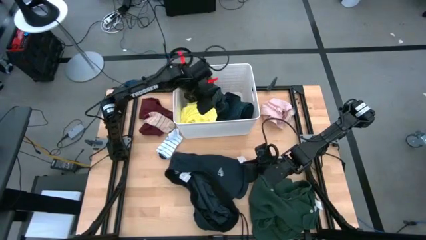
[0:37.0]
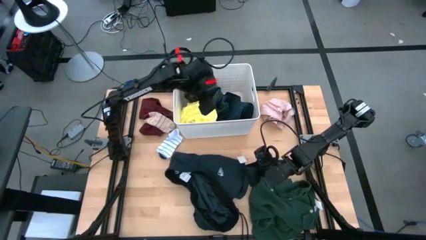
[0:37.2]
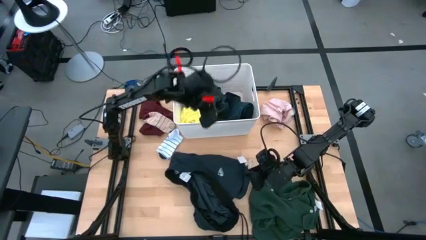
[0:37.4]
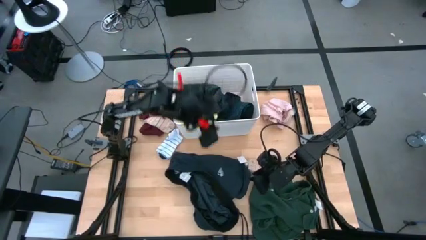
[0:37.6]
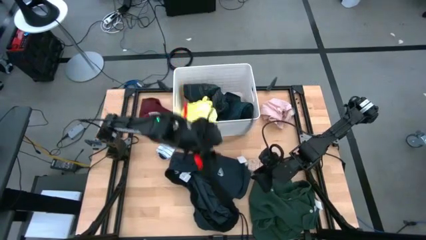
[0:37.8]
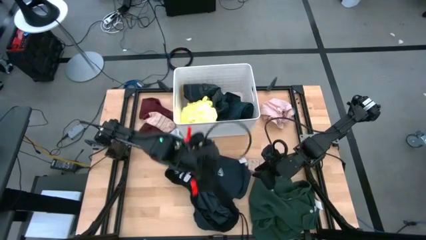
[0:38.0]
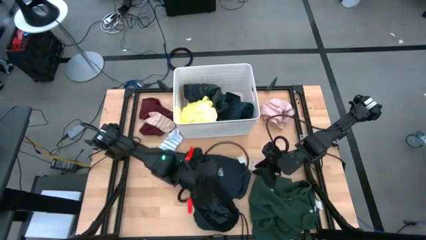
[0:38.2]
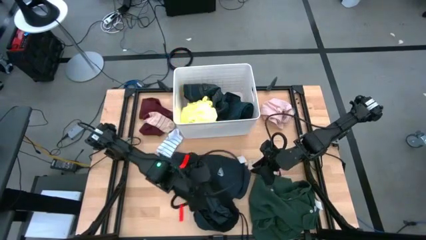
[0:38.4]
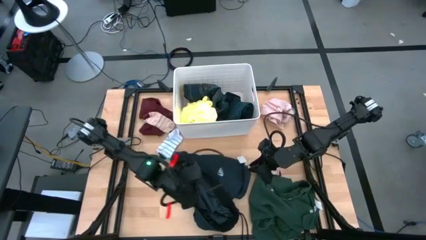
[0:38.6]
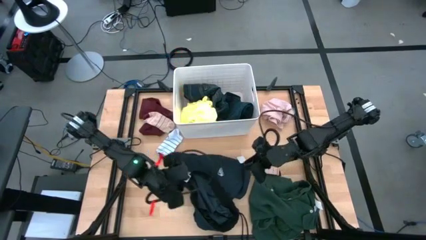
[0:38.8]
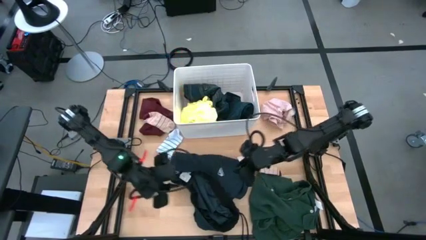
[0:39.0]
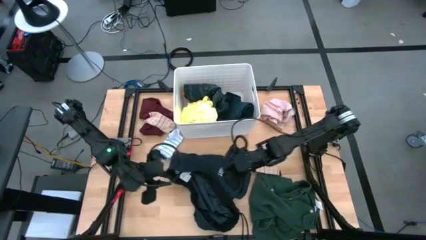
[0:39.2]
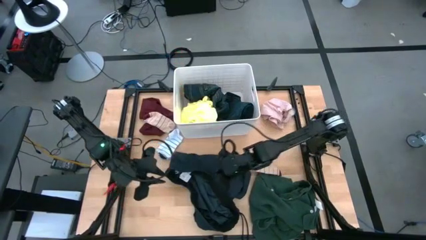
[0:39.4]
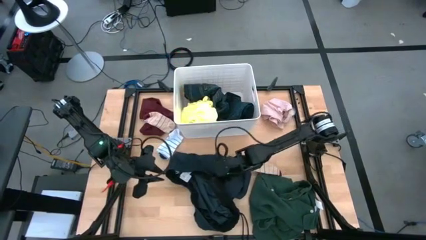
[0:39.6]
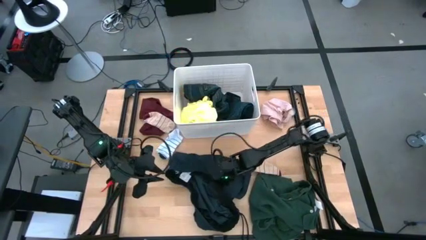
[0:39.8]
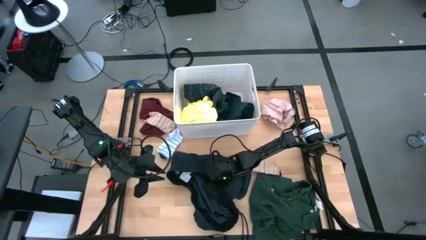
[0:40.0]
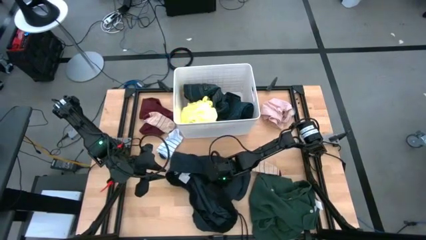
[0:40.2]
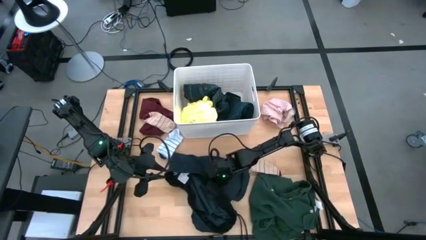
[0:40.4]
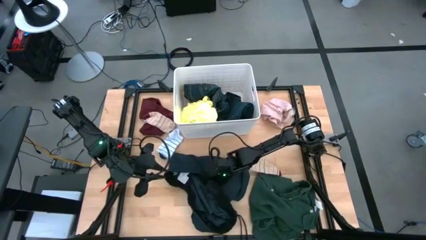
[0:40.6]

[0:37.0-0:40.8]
Task: Sort clothes
Put the dark blue shorts into the white bin

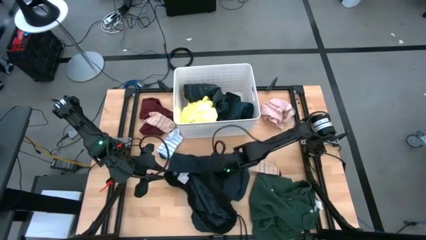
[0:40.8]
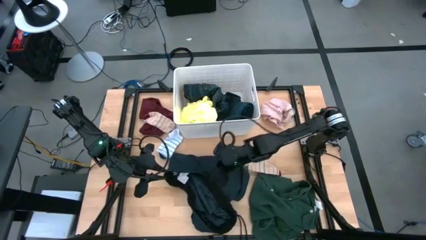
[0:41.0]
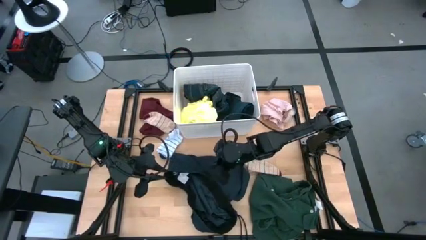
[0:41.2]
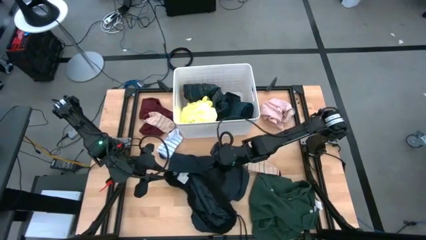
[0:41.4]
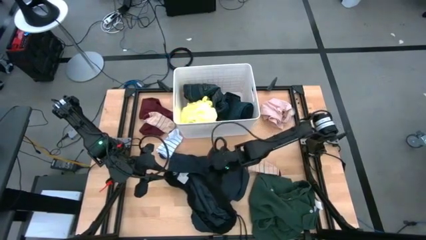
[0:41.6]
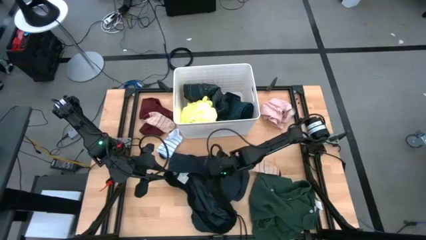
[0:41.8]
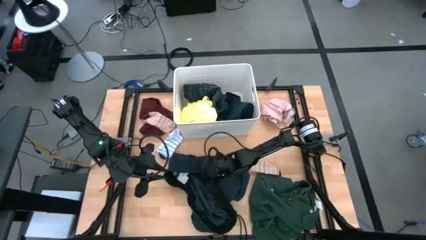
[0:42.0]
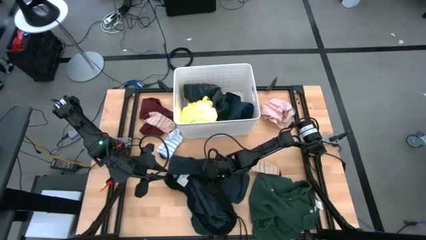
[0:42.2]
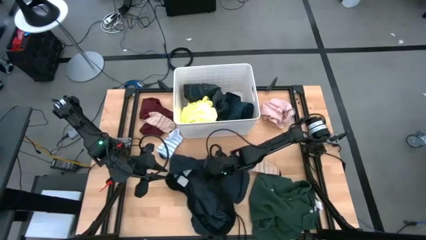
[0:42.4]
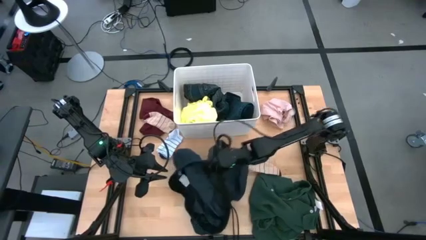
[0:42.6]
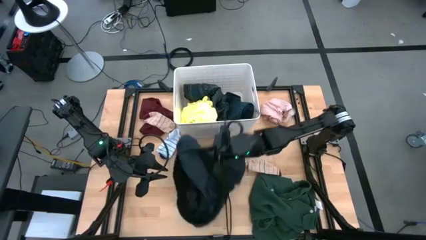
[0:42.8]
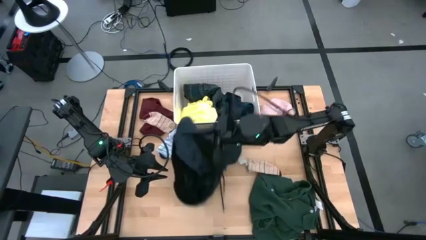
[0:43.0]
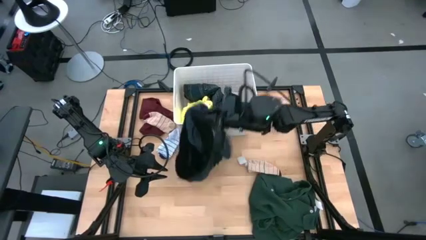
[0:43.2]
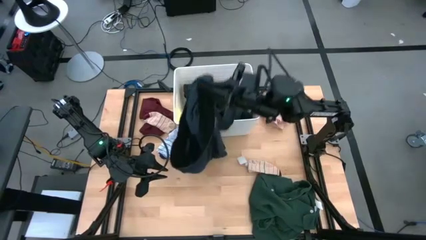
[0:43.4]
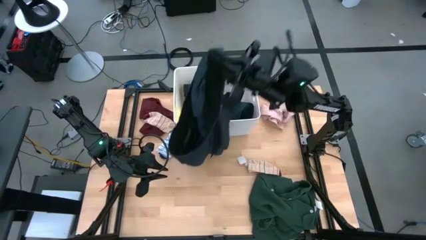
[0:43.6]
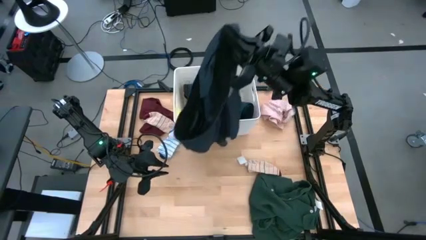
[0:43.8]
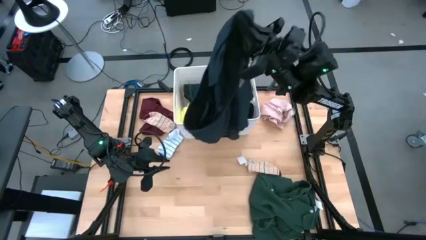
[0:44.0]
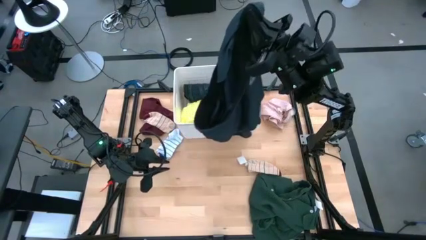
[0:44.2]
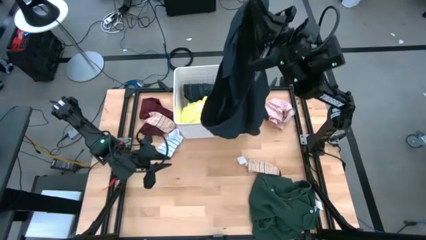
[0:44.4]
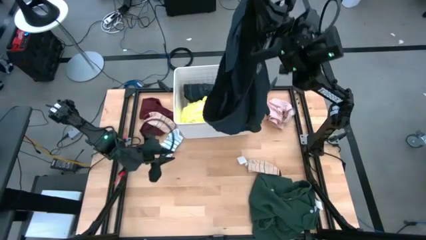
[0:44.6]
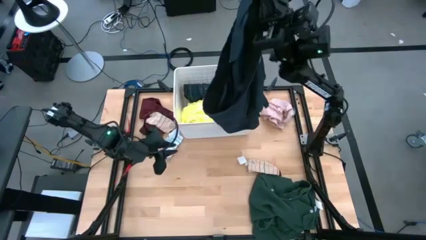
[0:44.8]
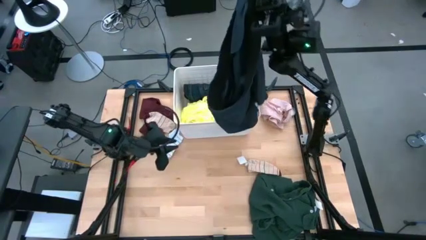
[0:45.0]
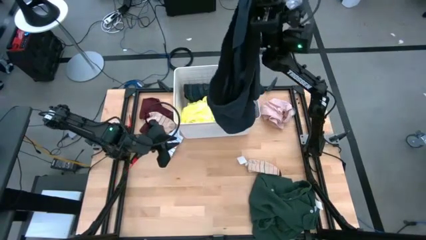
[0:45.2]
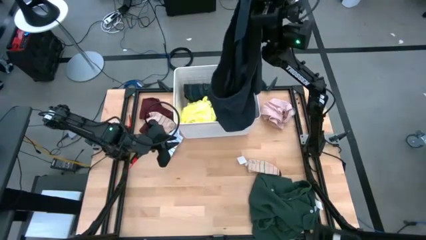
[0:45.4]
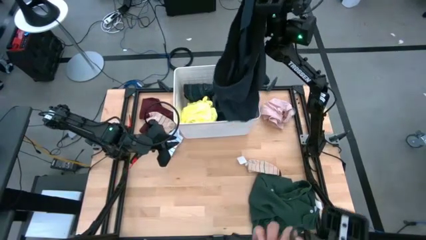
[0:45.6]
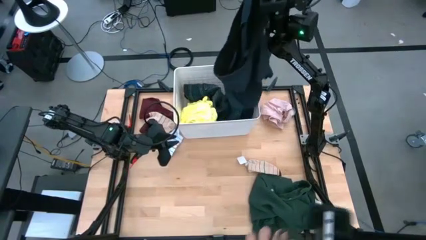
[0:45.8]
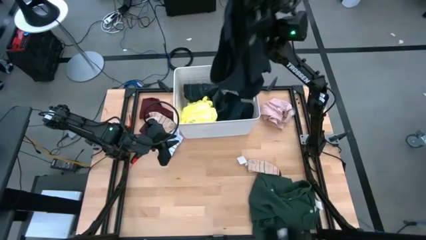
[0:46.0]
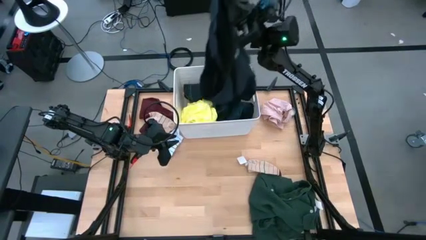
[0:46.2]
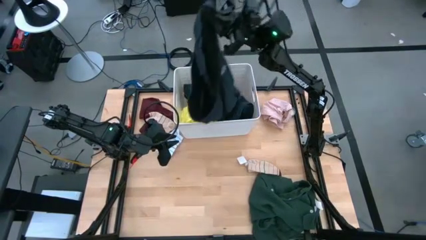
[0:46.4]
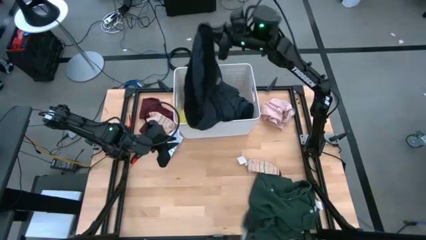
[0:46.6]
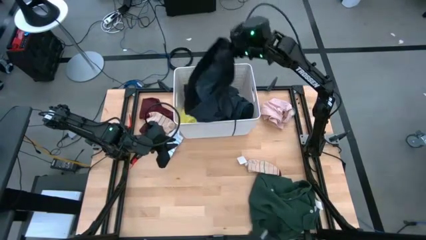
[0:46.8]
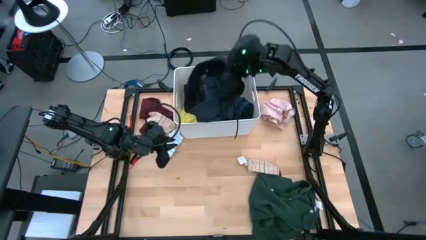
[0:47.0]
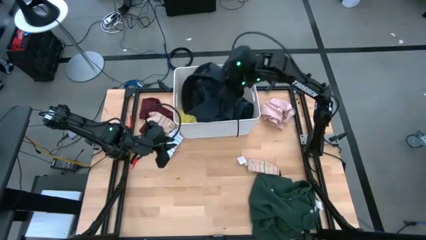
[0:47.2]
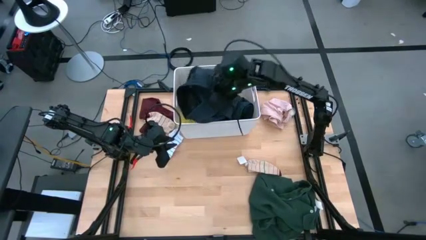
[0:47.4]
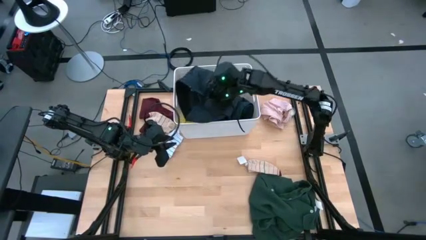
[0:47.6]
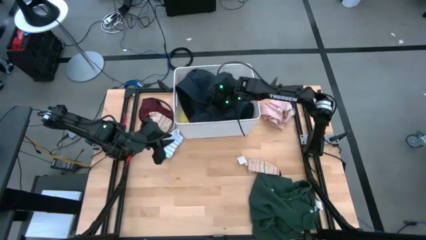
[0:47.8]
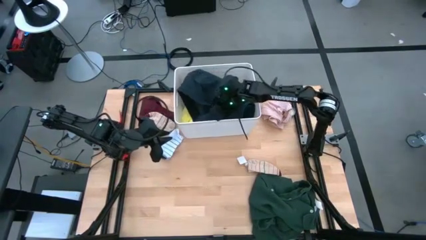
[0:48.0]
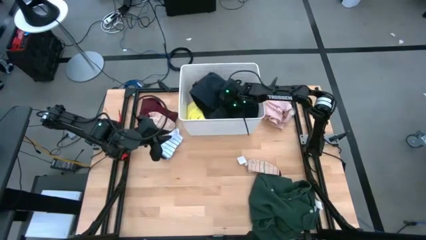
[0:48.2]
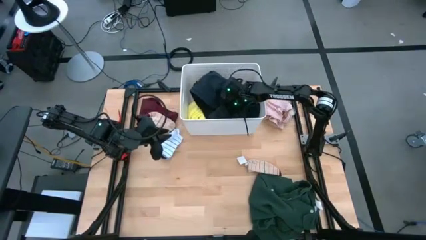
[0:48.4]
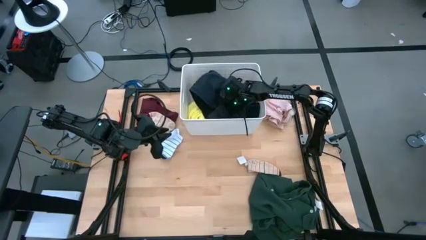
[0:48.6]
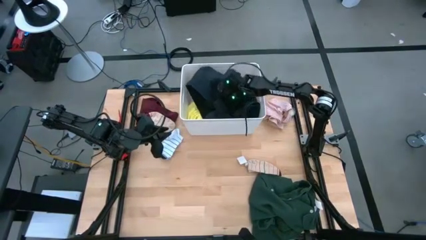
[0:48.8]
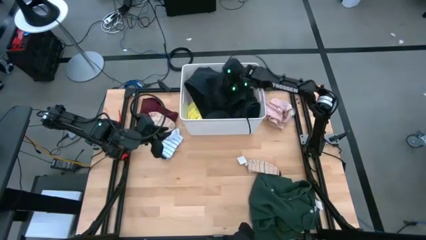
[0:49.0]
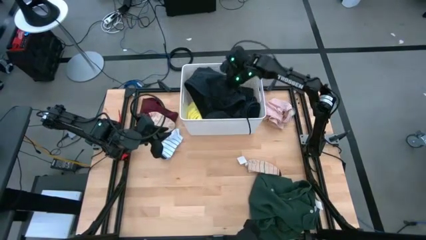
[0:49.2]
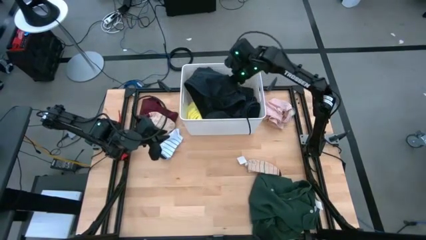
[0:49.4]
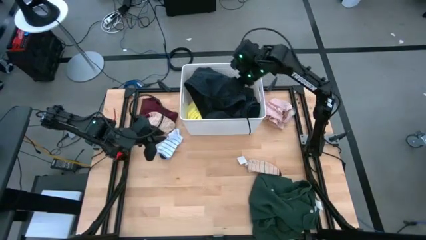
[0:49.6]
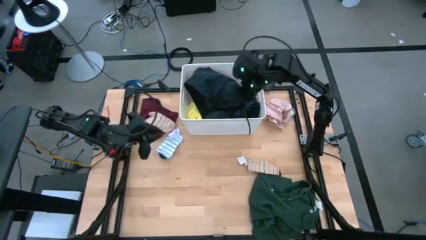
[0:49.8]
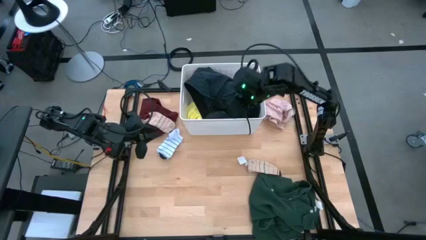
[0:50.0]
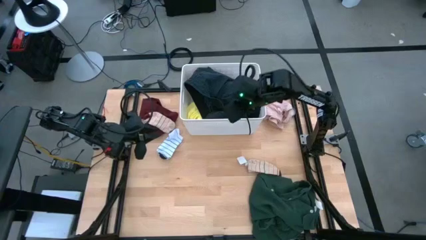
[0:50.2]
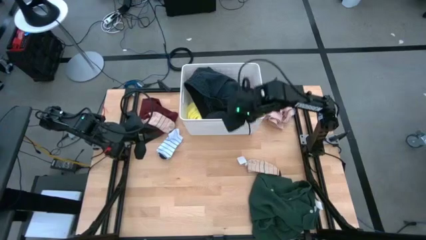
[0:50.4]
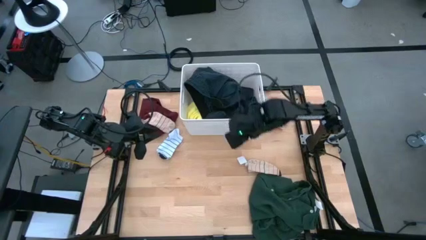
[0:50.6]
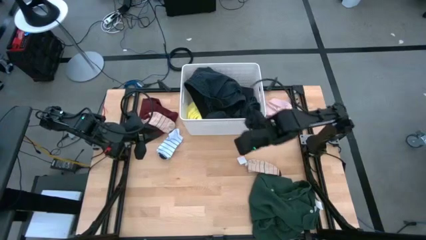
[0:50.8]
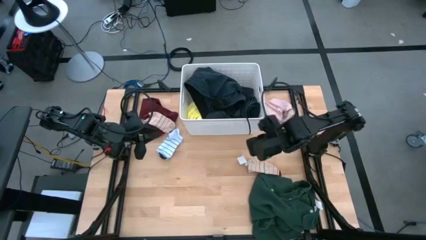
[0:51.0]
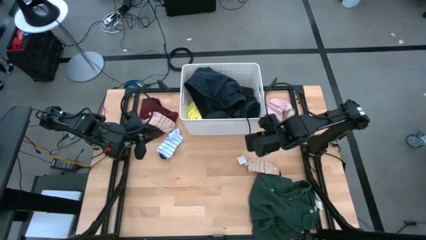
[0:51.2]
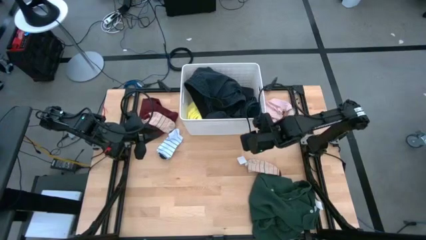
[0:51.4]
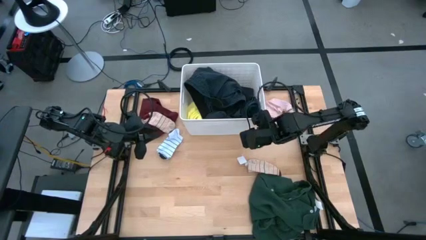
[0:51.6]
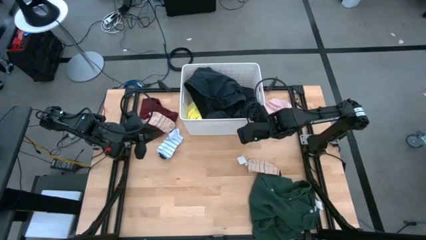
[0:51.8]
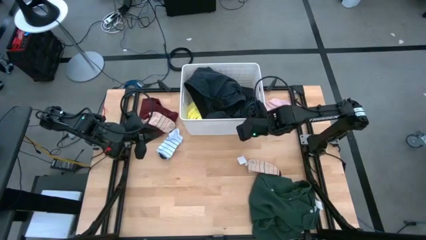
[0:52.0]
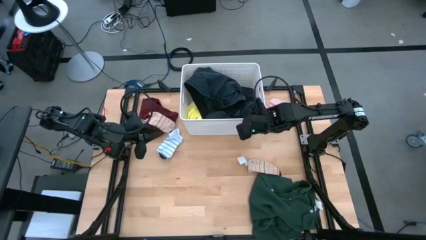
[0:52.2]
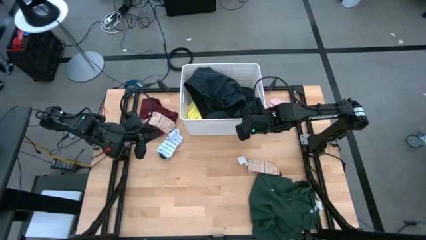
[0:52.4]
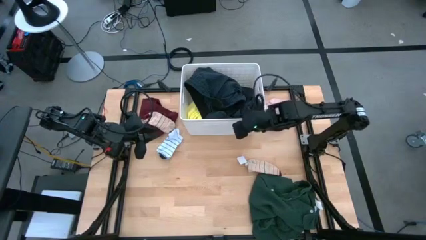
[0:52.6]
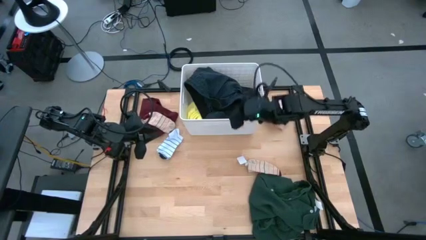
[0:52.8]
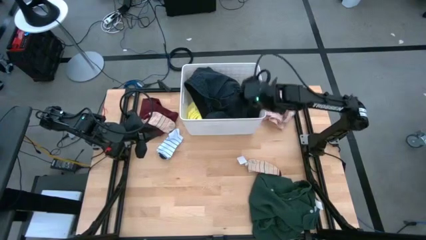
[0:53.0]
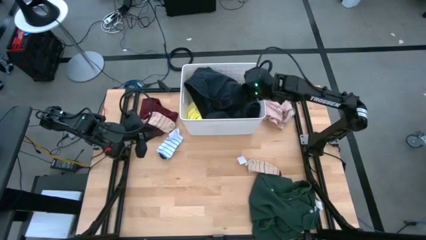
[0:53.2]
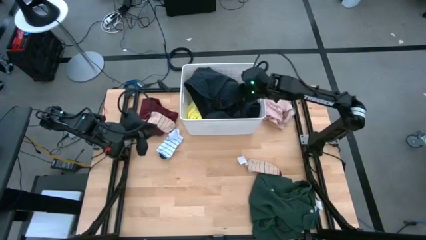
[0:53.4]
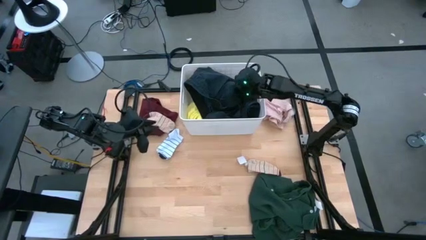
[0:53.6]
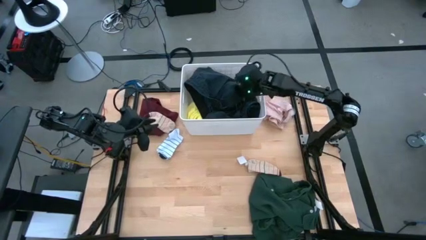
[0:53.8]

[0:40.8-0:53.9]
Put the dark blue shorts into the white bin
